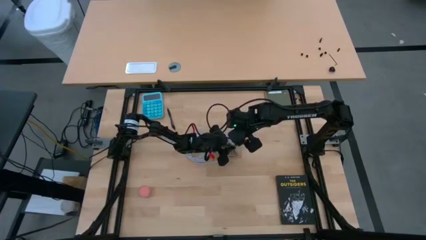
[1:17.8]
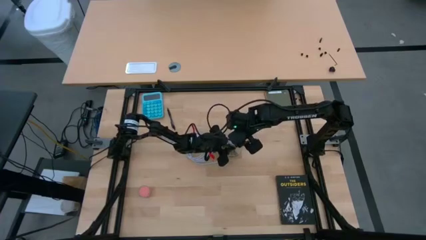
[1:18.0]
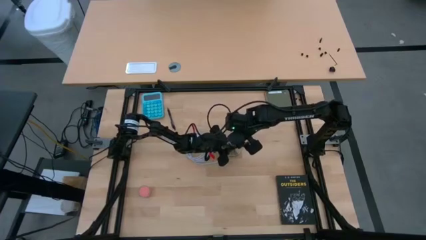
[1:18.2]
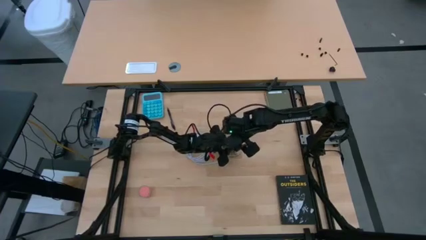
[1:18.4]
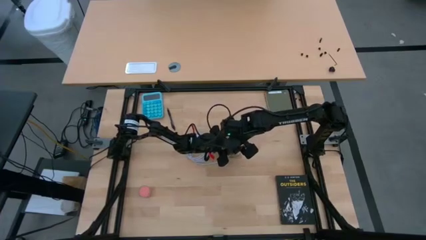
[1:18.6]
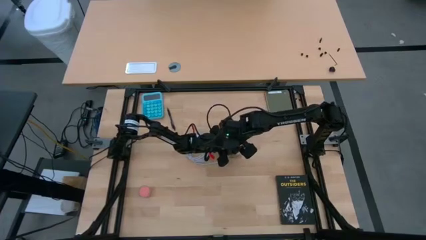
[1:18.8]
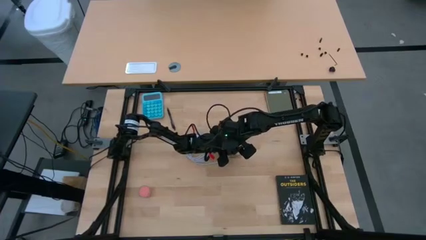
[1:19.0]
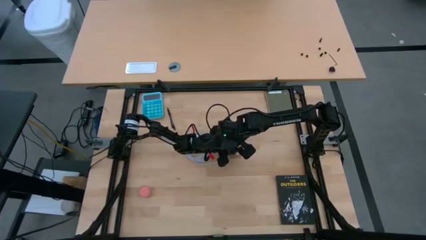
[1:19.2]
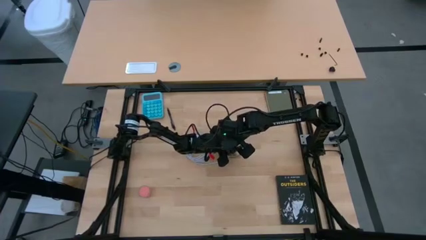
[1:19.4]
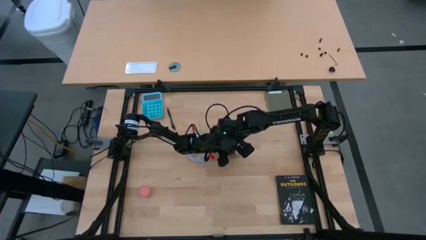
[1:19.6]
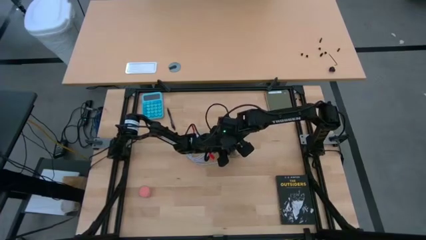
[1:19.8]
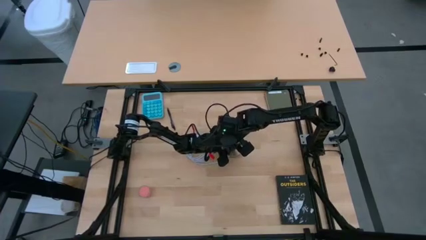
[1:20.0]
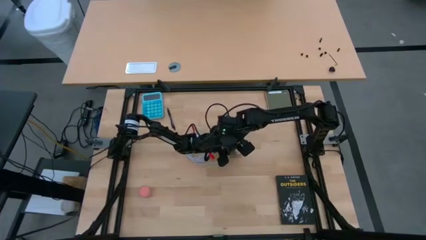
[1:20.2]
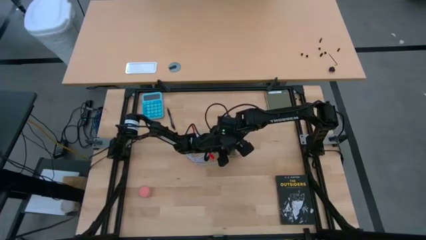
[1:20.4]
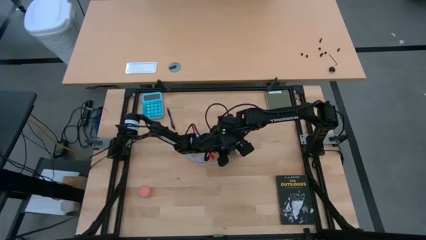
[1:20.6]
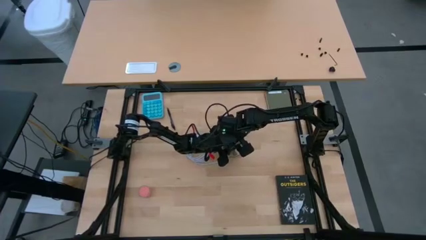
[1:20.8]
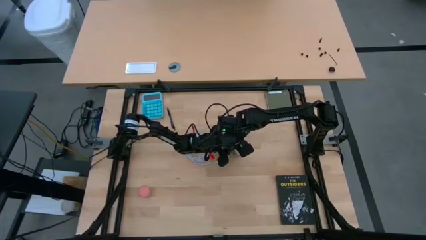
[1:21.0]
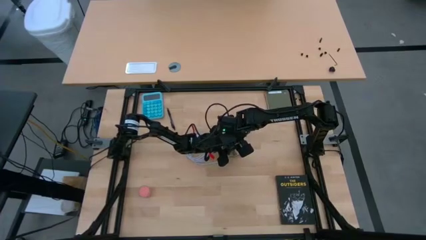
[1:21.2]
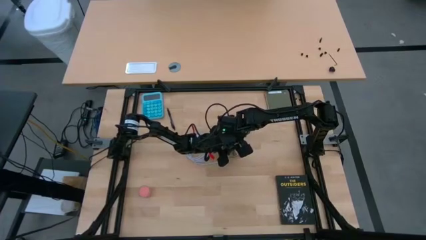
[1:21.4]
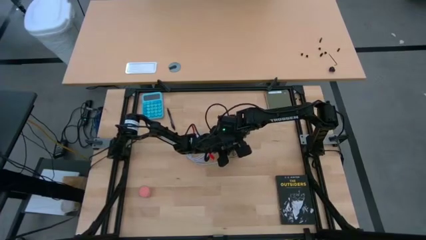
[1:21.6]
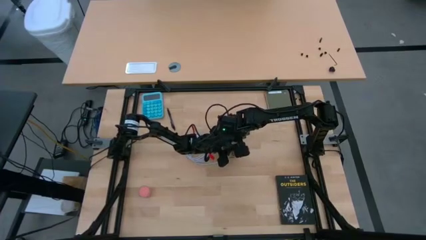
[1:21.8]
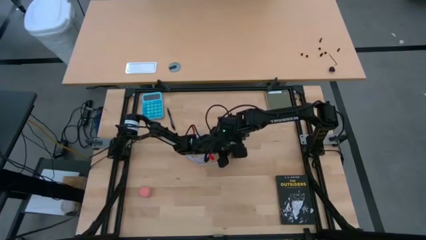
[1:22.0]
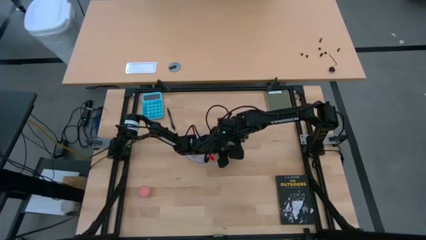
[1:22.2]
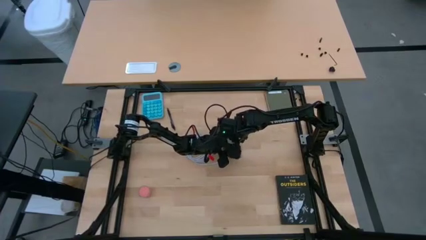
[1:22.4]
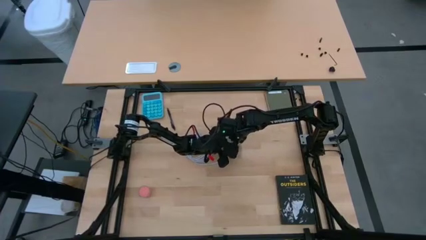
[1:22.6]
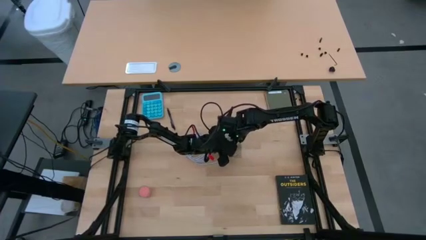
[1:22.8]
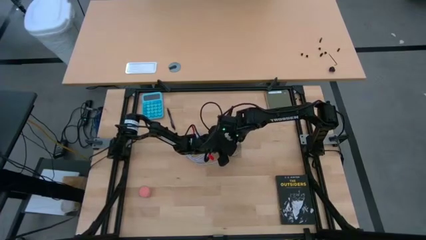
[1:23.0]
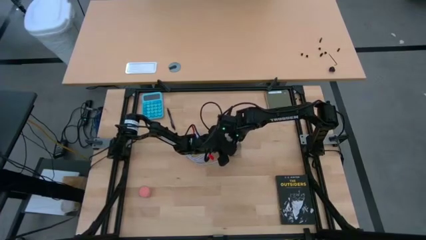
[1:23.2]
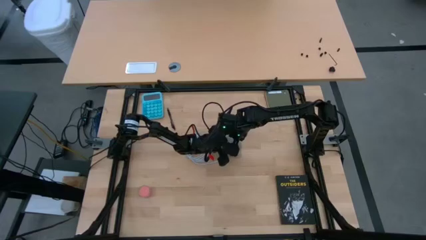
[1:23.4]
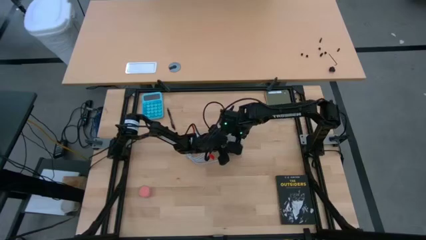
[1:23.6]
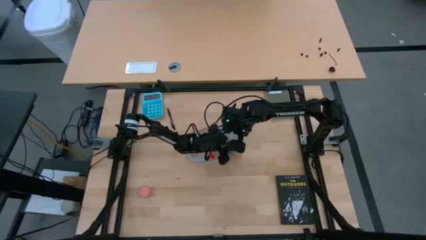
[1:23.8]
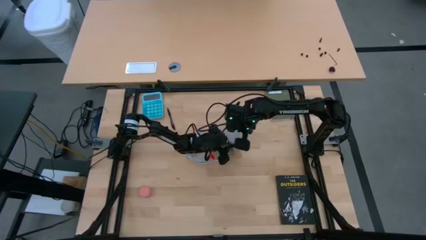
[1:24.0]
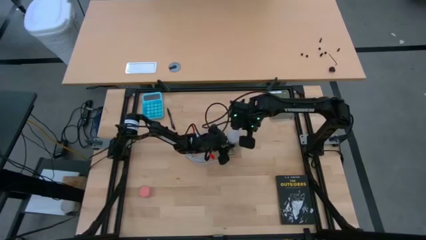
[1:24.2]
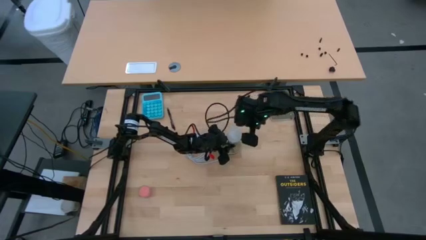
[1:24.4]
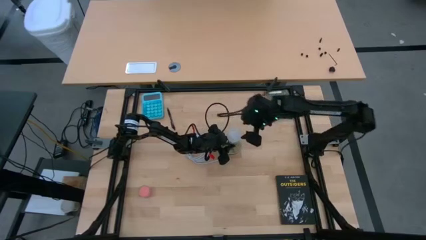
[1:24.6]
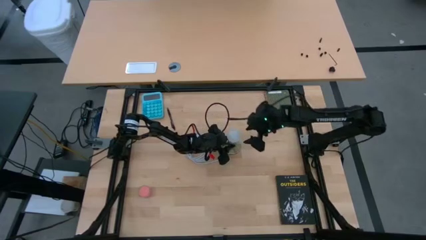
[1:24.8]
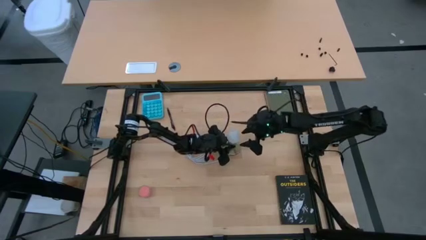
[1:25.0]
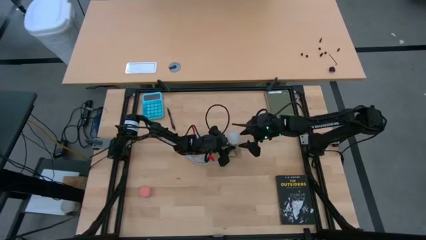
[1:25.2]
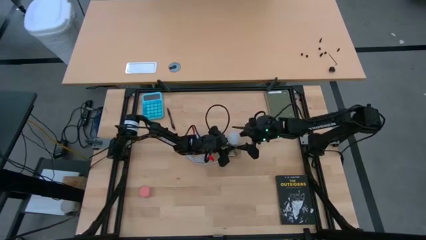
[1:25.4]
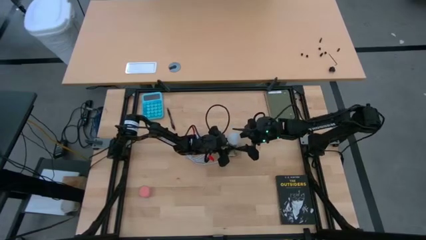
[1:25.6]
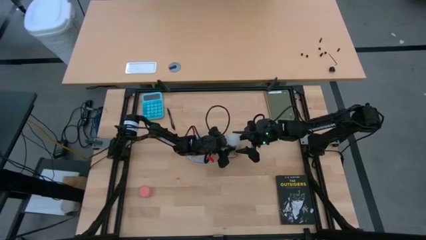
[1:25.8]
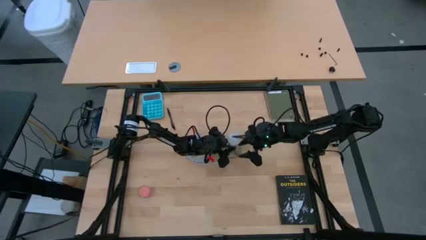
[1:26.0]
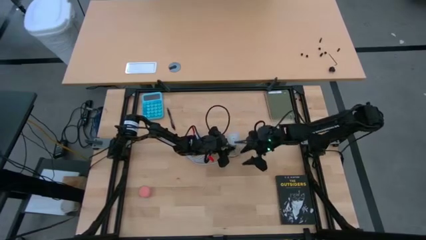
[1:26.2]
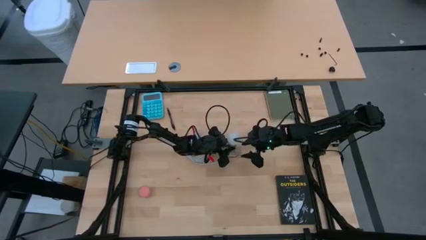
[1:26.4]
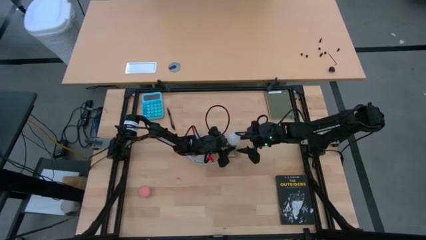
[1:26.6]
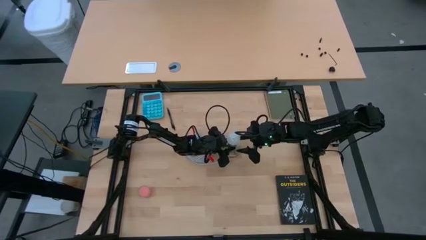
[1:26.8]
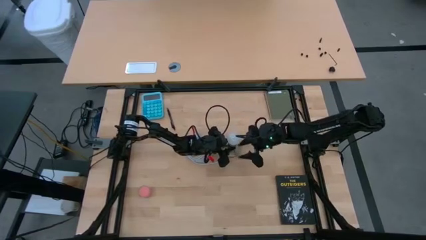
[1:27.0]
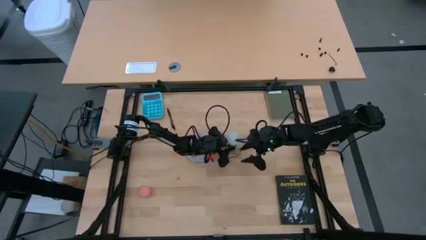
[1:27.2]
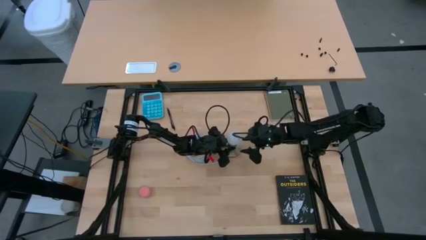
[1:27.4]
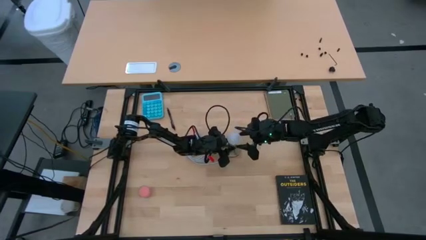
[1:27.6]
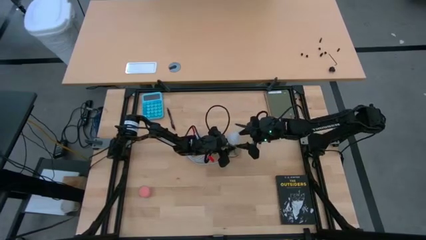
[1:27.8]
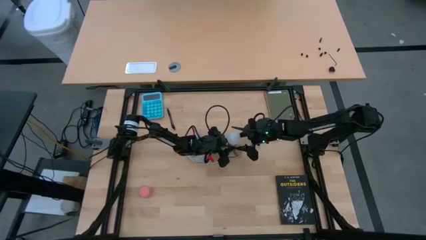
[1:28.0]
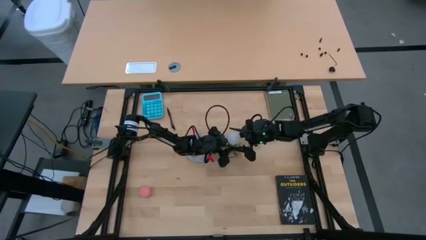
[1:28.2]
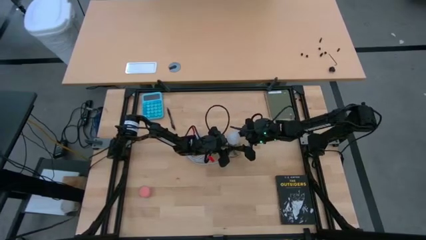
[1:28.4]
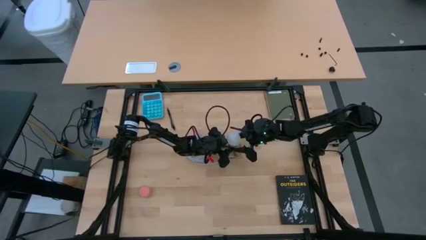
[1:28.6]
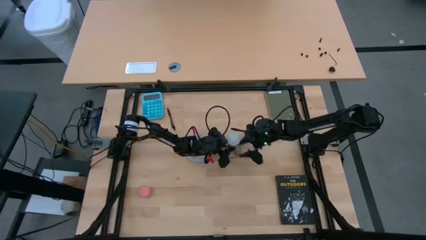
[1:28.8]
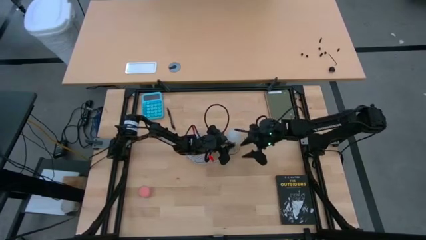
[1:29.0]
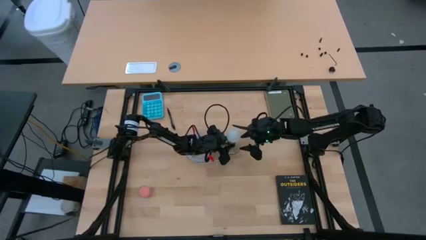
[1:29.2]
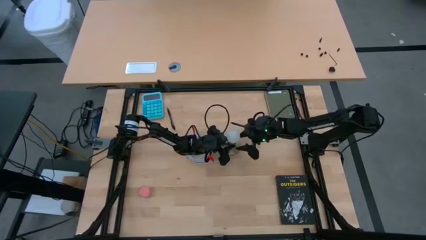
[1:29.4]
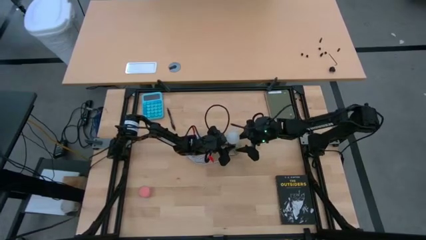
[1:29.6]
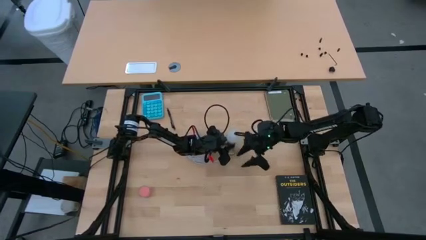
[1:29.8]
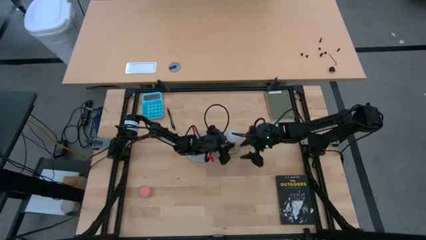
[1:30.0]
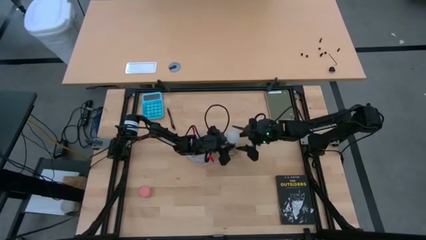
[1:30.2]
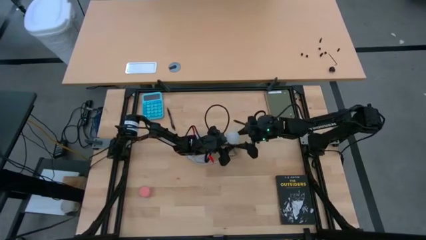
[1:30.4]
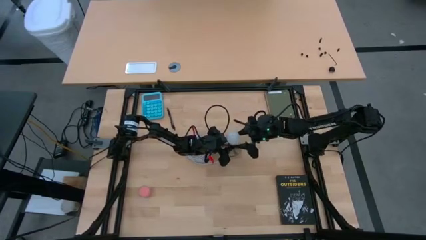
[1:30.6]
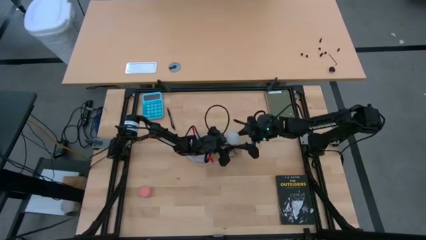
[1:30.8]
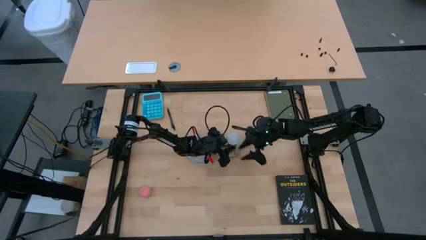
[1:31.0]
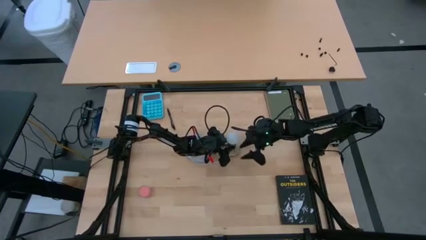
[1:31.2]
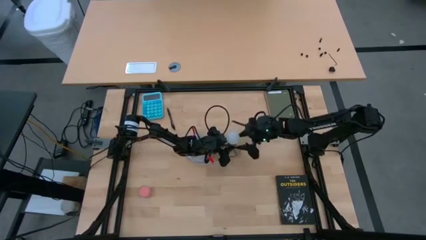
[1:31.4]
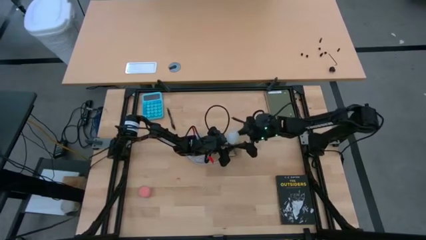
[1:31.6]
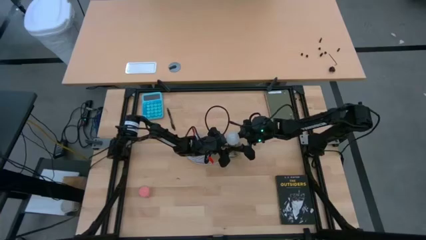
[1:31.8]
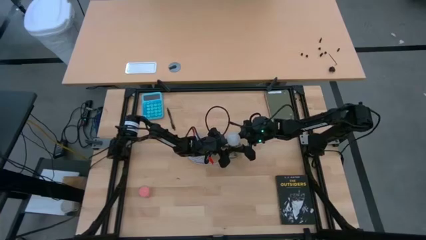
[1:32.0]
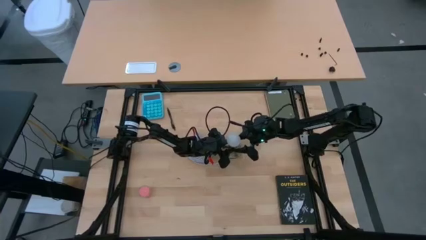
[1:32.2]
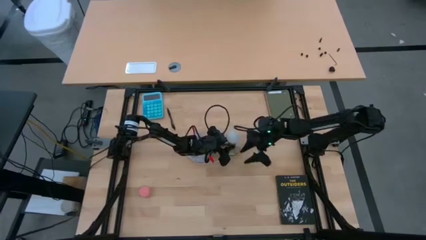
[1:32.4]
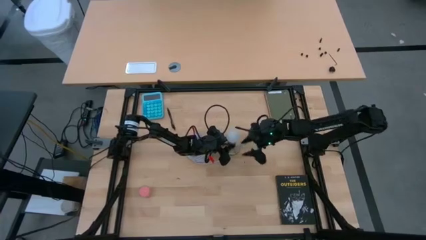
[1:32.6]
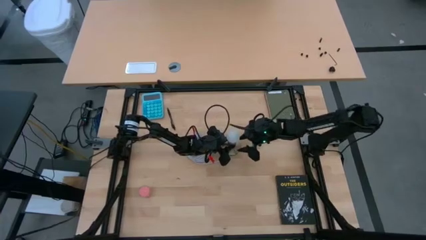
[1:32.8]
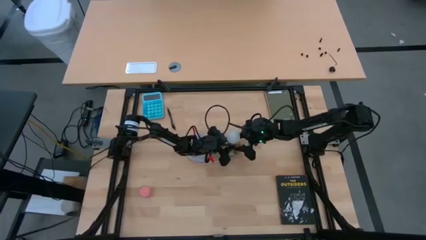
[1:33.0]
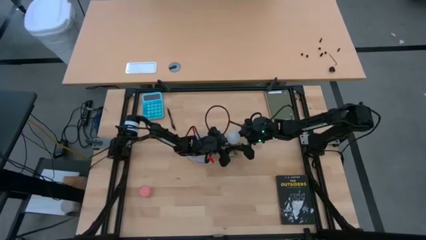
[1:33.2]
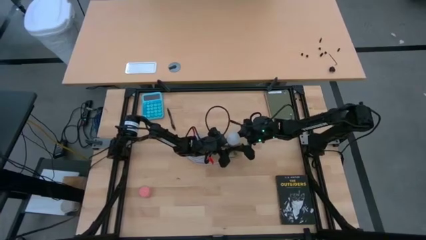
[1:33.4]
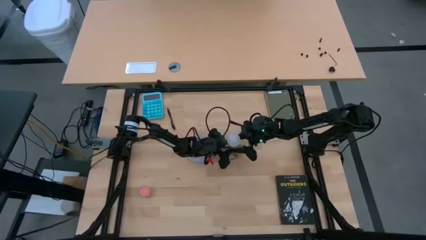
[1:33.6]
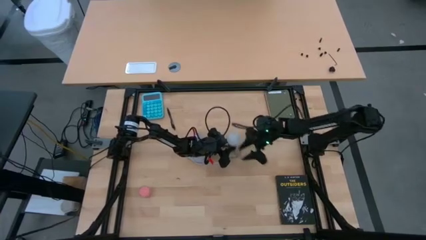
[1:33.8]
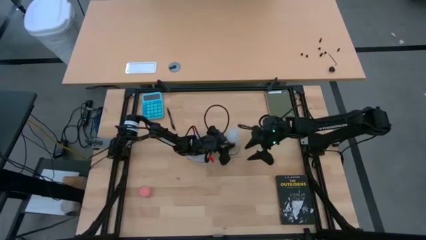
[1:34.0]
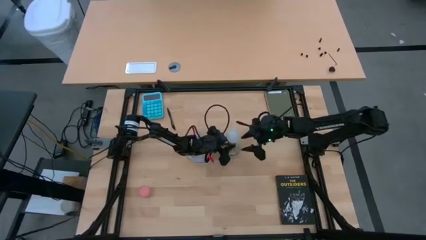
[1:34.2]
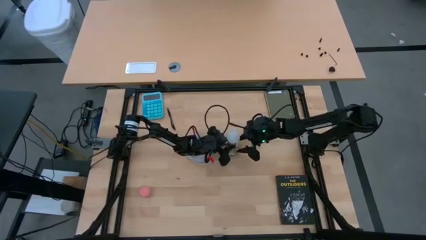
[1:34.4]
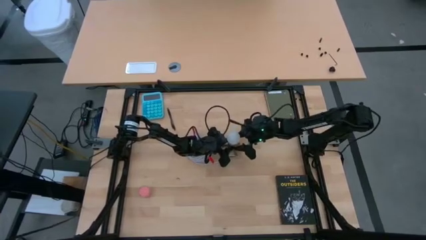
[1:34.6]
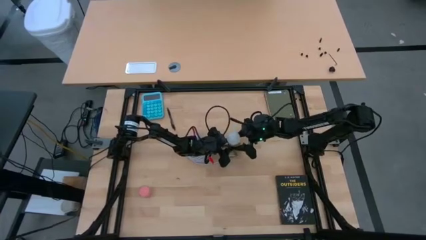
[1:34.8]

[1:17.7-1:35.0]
Task: Screw lightbulb
Insert the white lightbulb into the desk lamp
